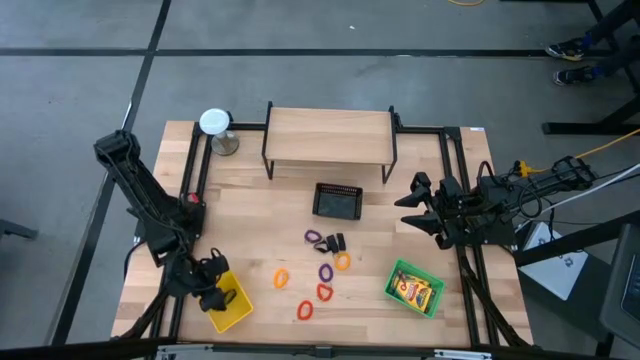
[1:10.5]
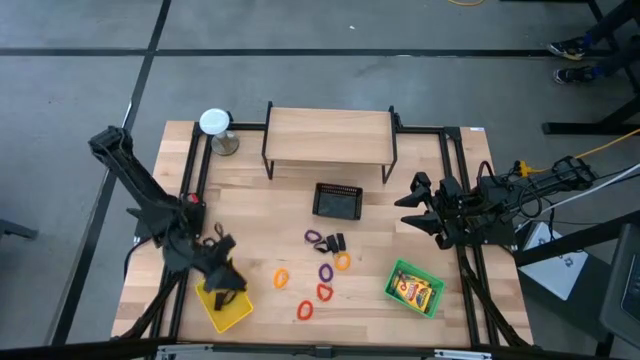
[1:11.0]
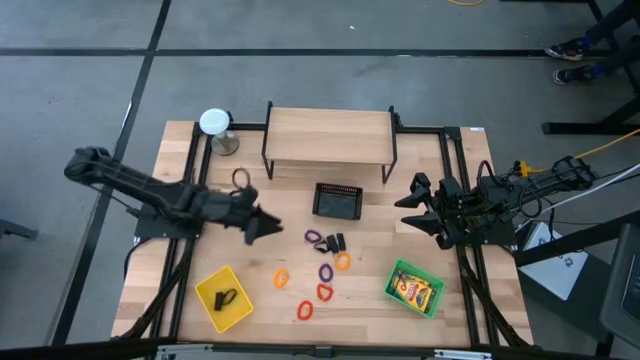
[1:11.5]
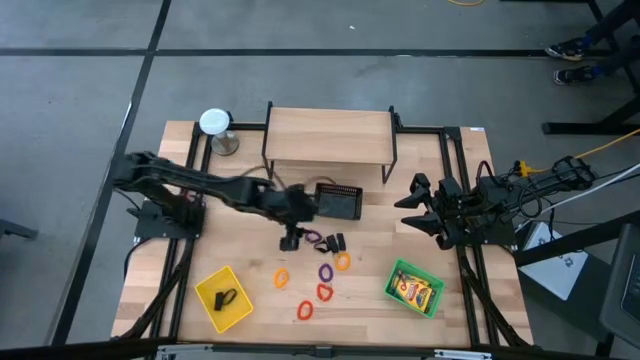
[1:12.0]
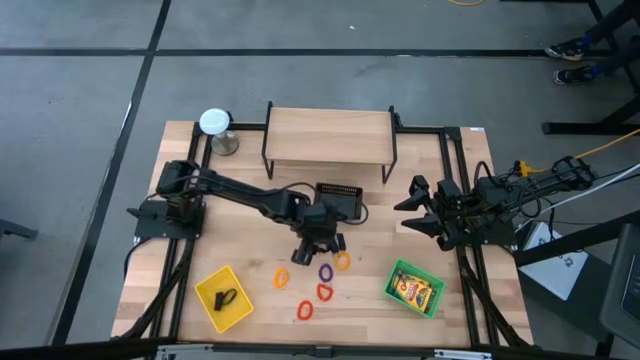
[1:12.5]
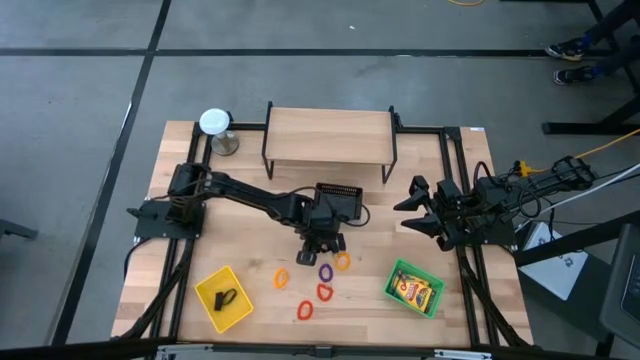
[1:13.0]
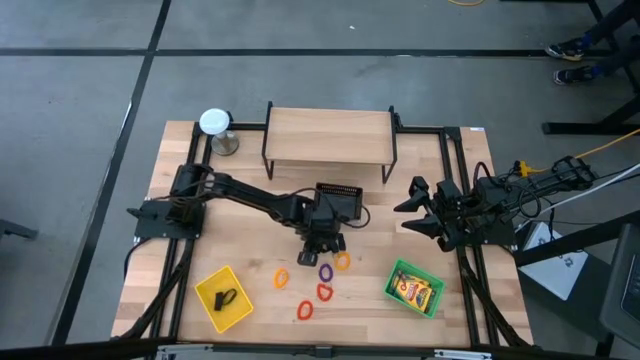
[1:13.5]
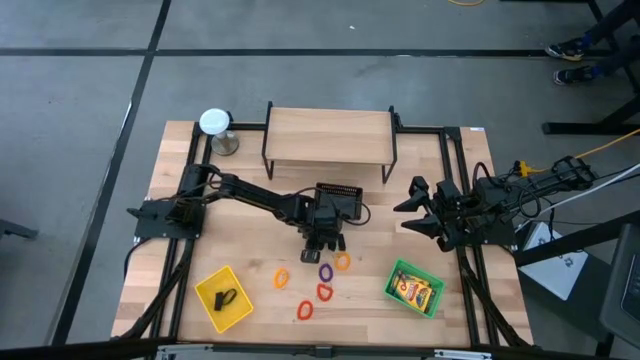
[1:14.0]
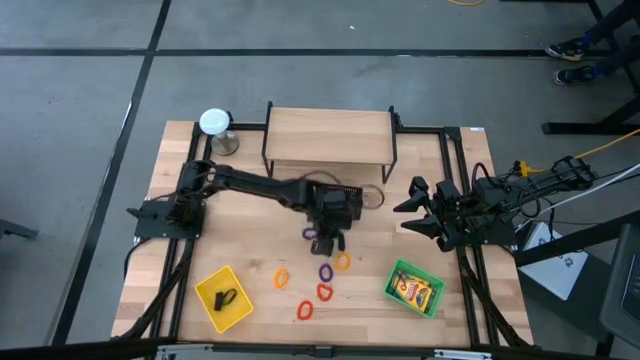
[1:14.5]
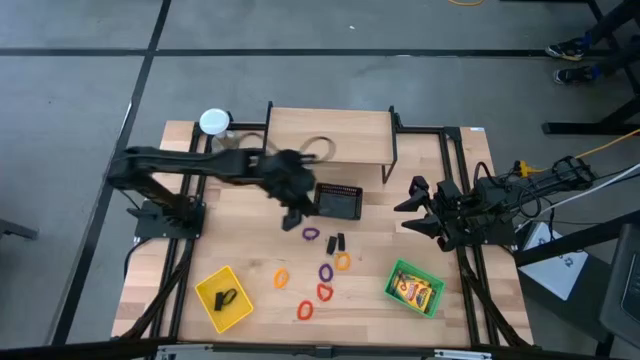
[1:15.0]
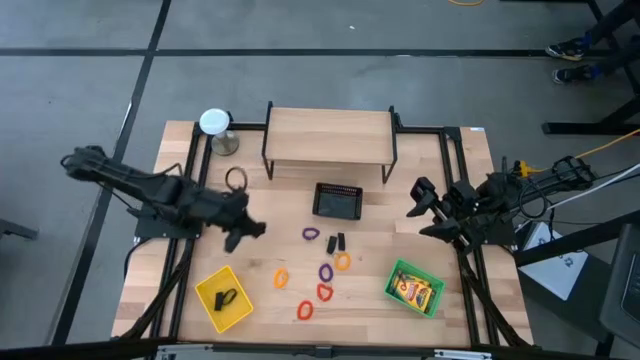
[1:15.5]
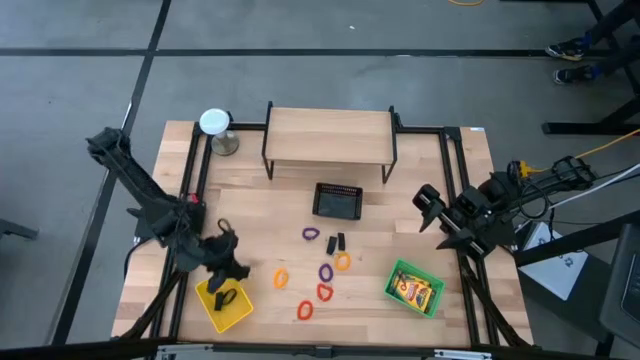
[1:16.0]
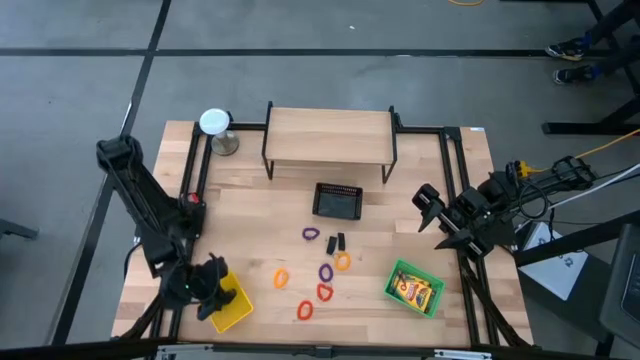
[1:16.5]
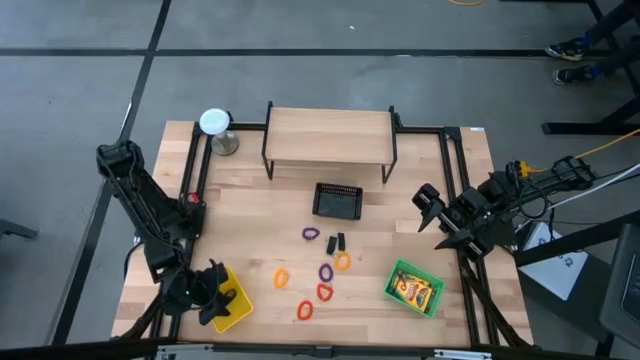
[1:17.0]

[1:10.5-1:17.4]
Task: Pick & Place Office Desk Supplies
Put the left black rubber band into the yellow basket

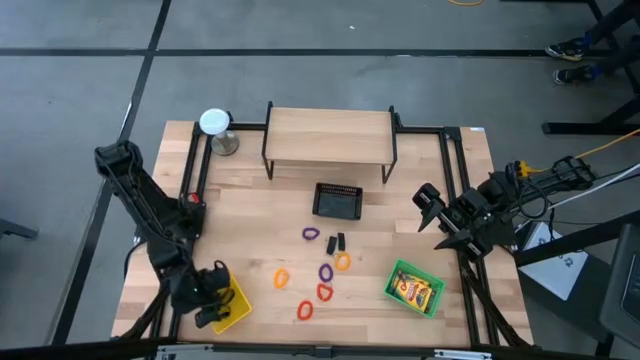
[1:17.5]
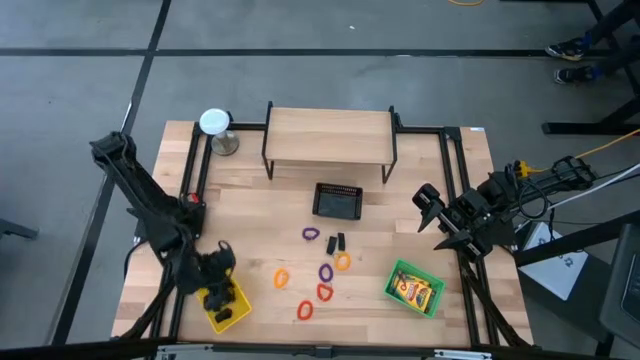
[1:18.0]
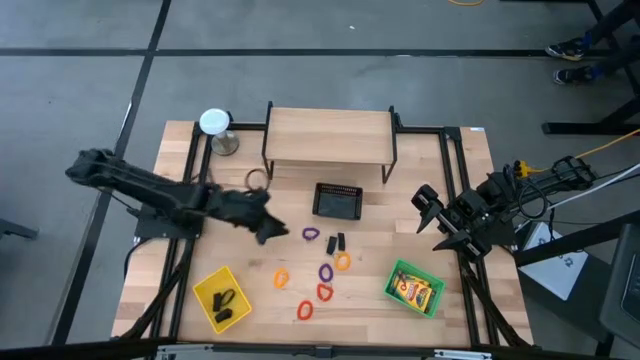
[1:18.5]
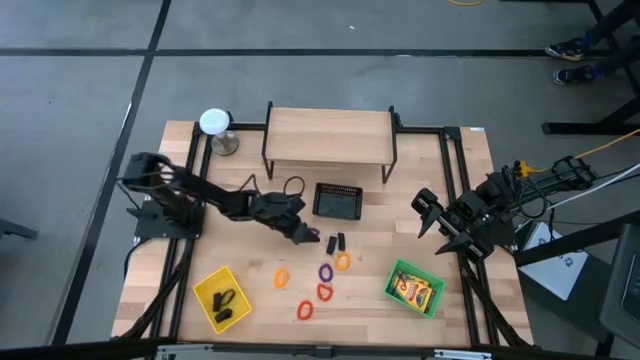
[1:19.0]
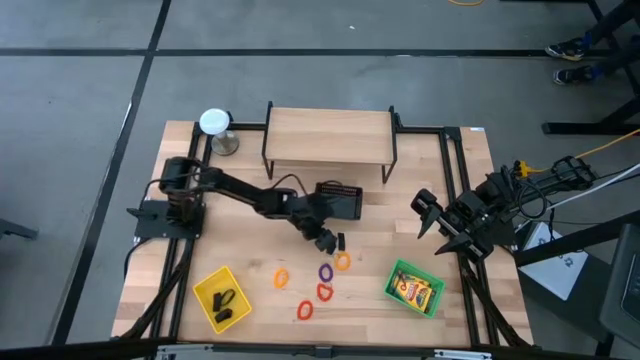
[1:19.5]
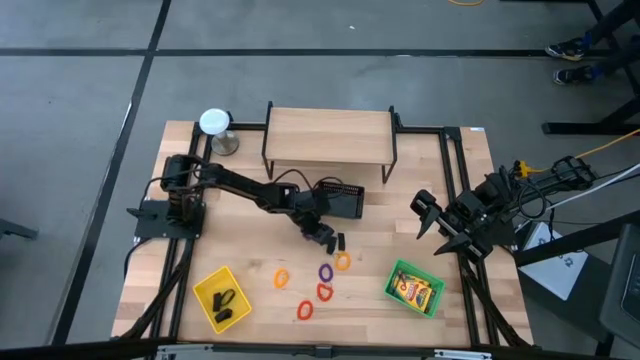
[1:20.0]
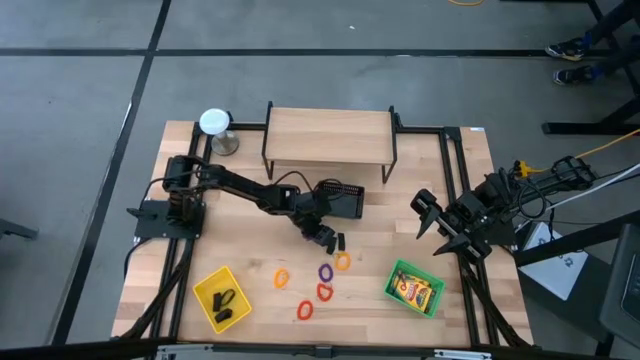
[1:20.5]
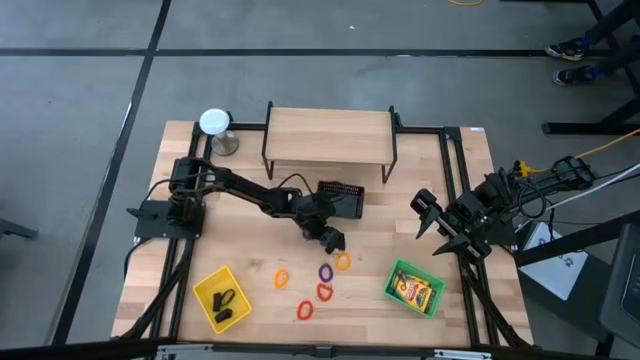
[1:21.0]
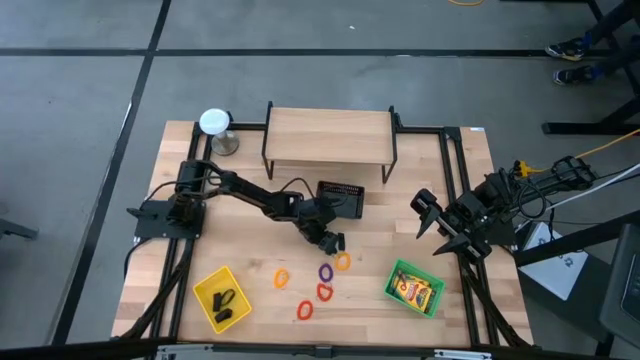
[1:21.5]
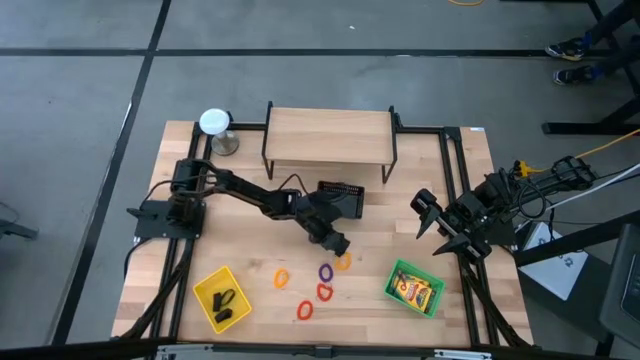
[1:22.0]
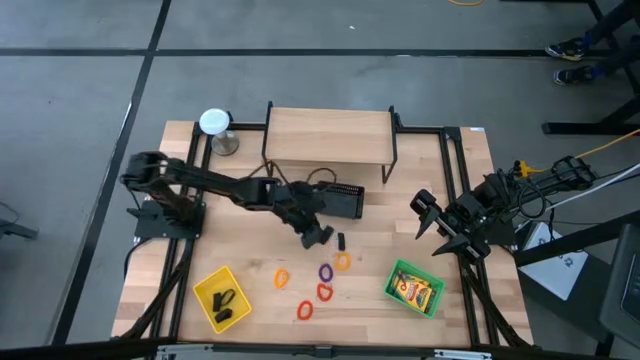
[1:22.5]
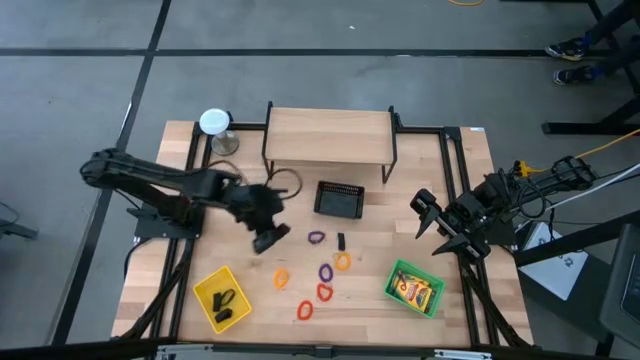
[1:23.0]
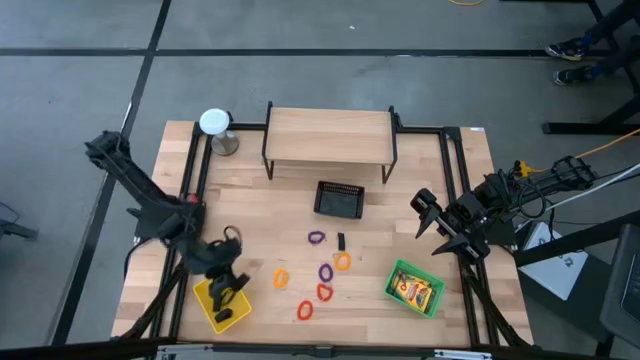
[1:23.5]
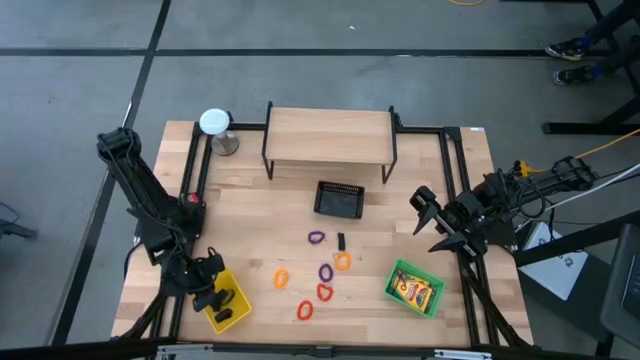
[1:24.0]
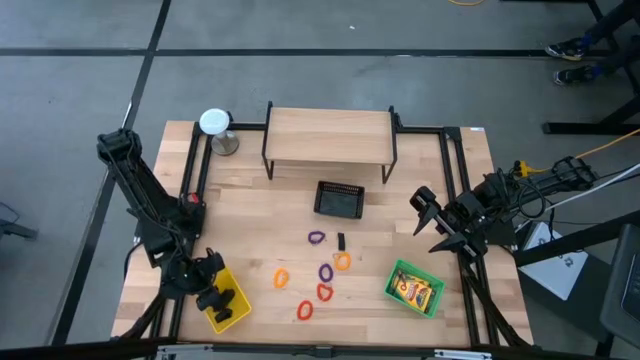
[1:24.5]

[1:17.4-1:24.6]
Put the left black rubber band into the yellow basket

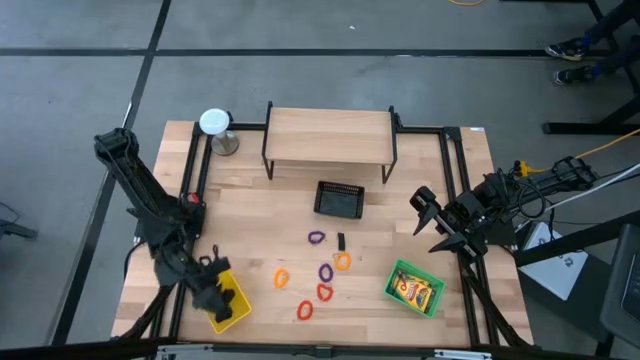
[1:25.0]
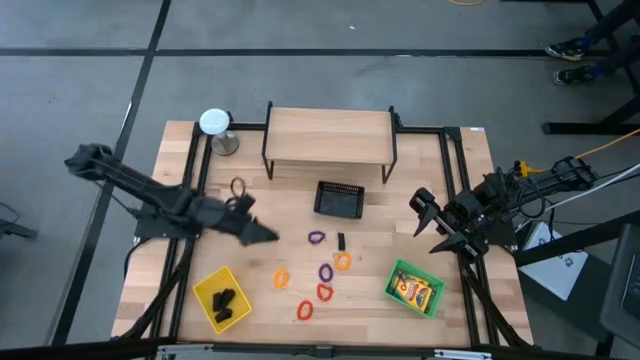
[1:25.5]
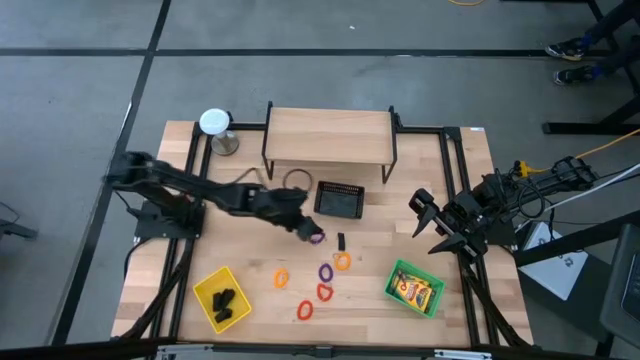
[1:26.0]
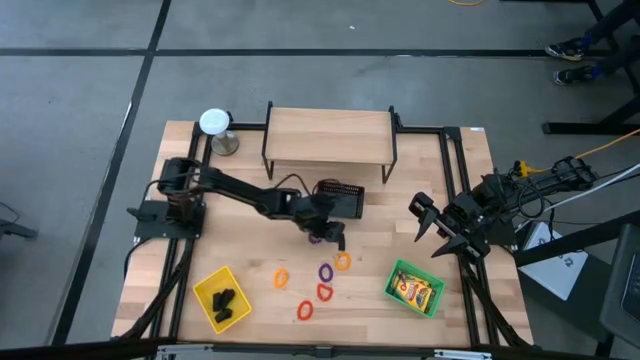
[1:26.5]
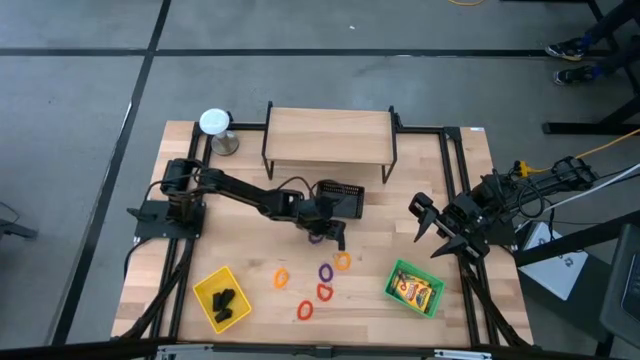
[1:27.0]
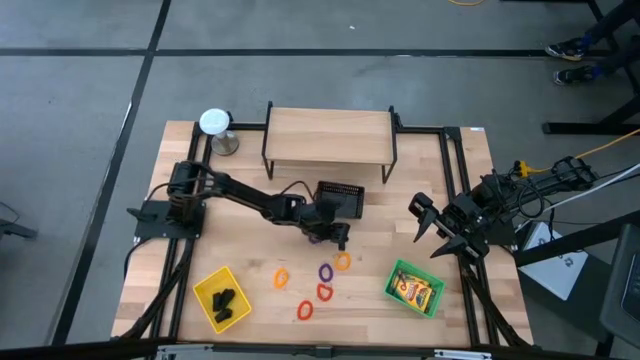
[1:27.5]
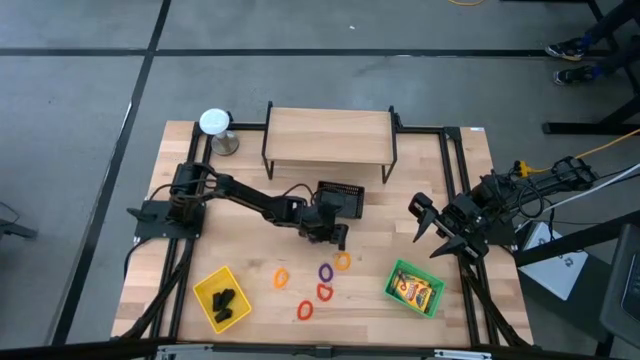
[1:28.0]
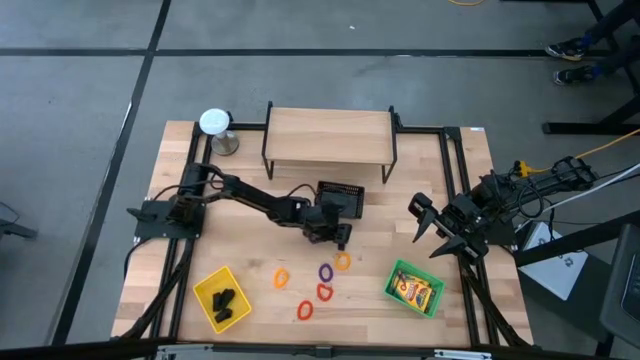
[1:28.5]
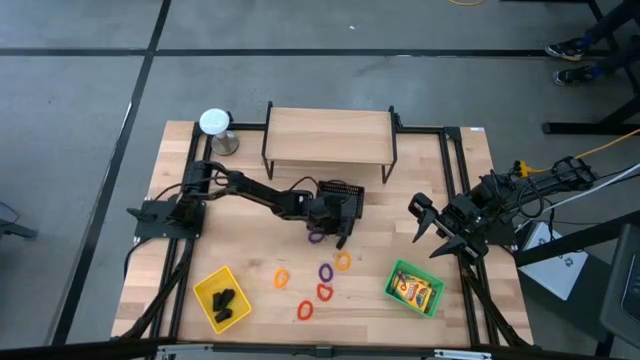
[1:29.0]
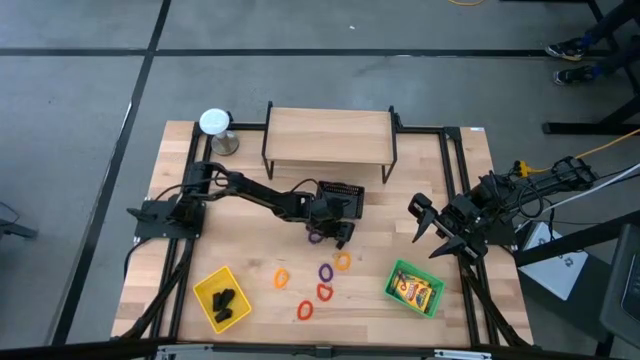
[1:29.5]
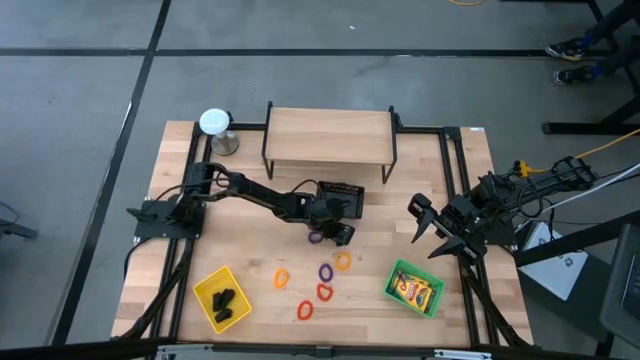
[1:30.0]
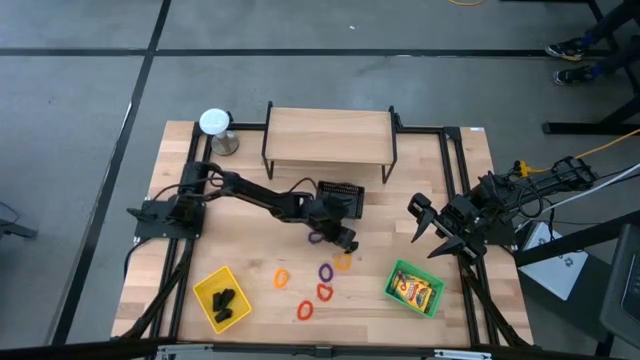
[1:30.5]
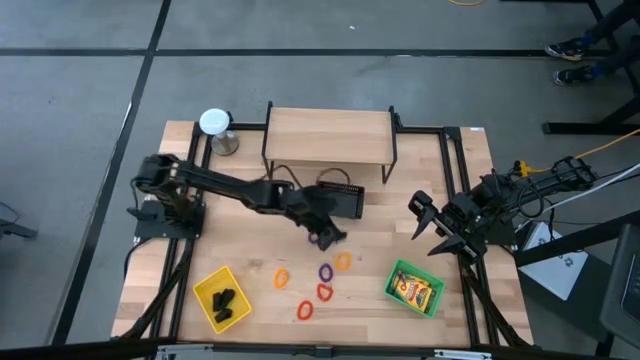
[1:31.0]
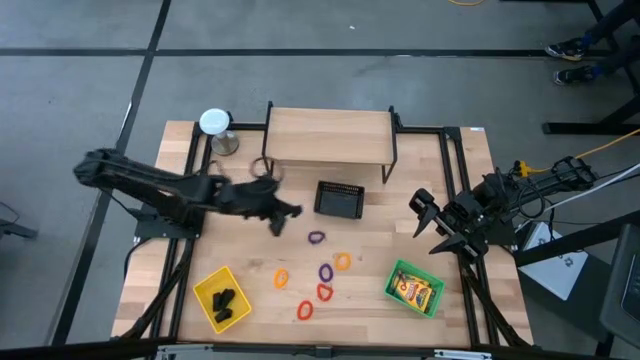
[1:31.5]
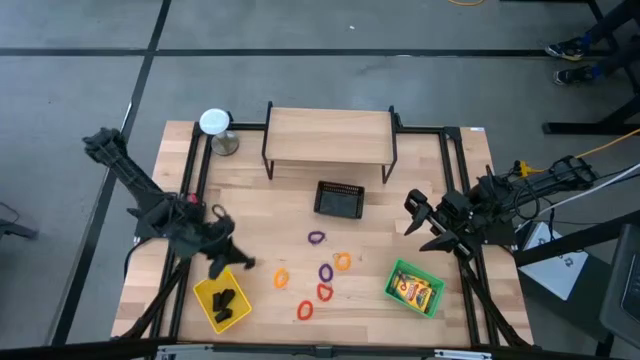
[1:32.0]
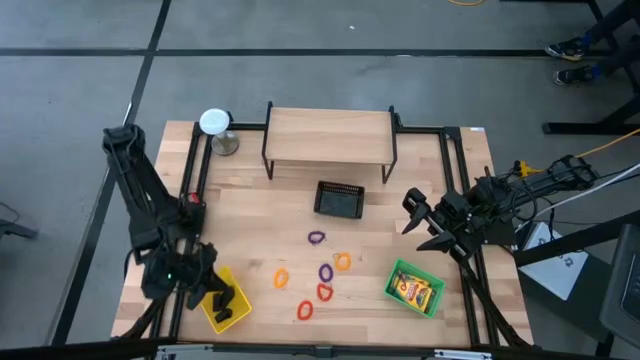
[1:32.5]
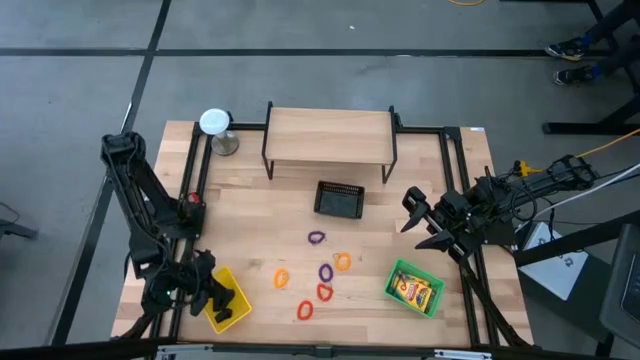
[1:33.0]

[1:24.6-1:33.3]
Put the black rubber band into the yellow basket
